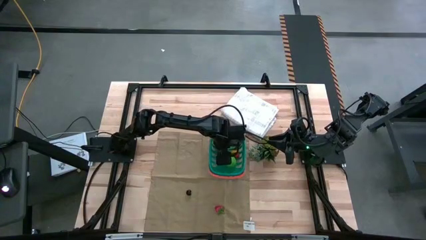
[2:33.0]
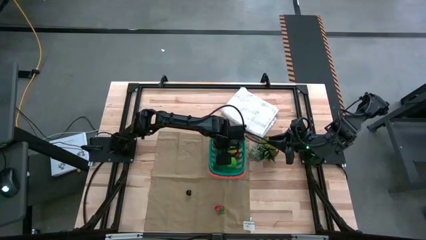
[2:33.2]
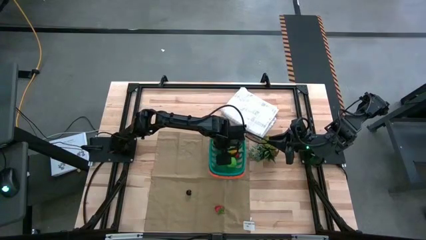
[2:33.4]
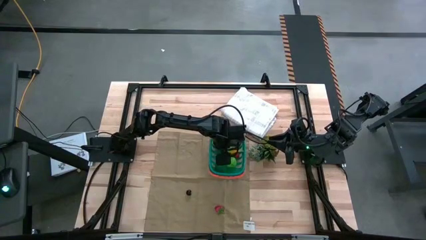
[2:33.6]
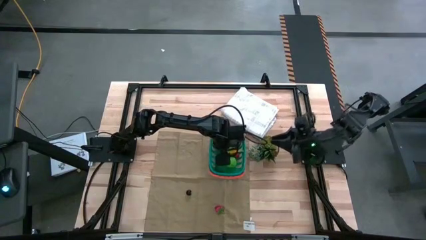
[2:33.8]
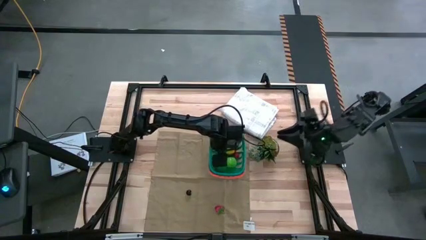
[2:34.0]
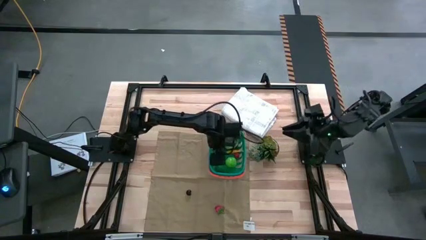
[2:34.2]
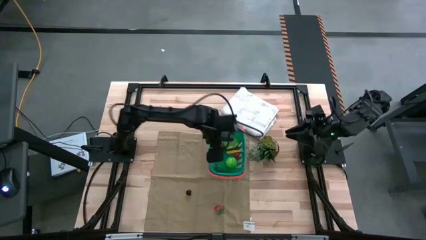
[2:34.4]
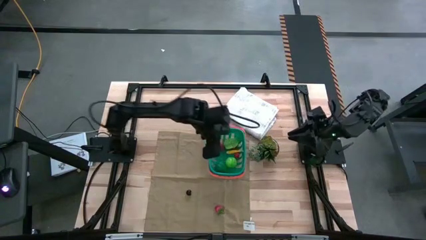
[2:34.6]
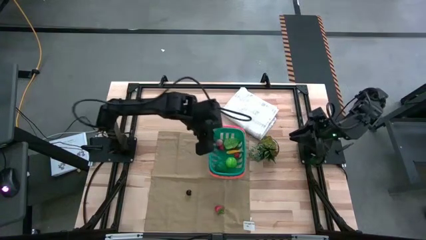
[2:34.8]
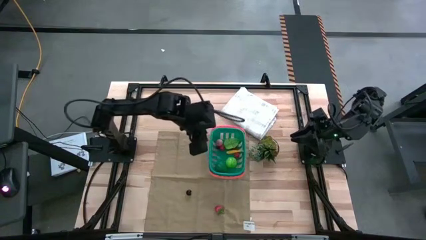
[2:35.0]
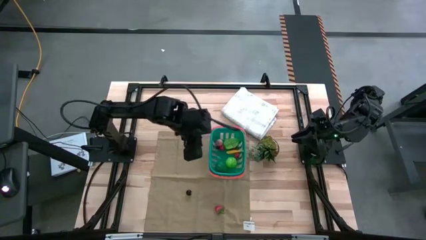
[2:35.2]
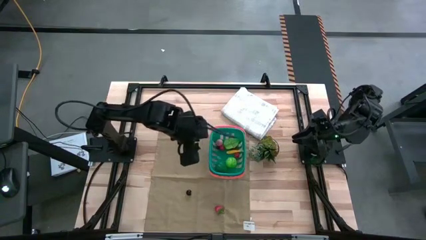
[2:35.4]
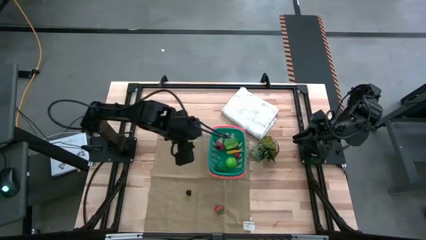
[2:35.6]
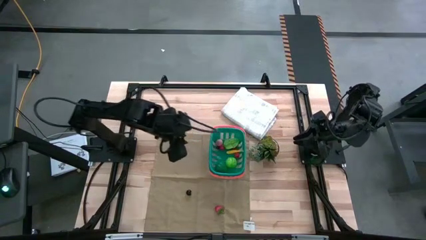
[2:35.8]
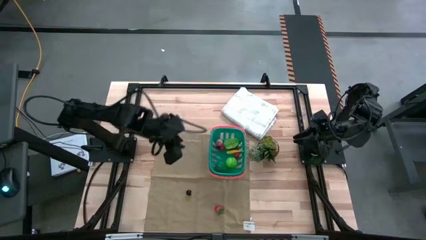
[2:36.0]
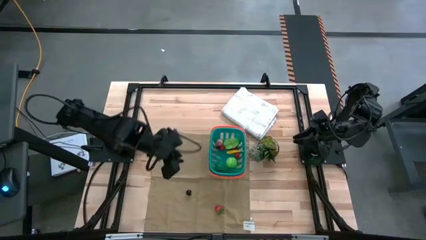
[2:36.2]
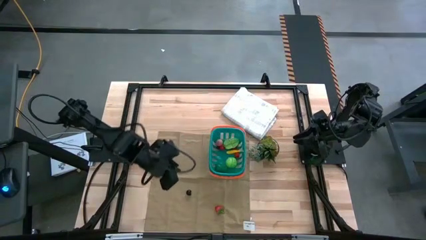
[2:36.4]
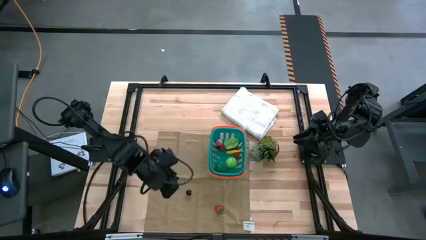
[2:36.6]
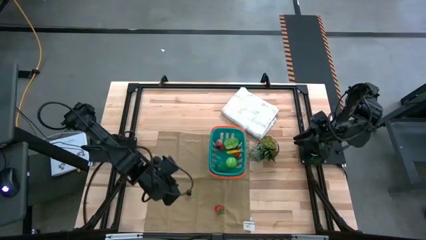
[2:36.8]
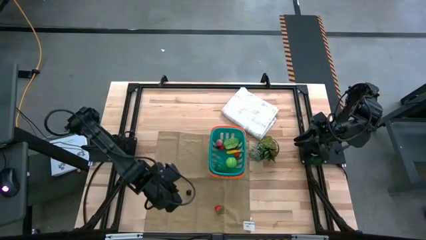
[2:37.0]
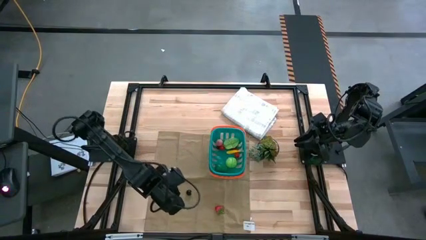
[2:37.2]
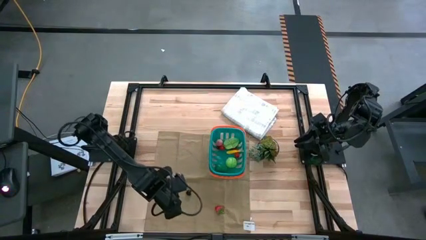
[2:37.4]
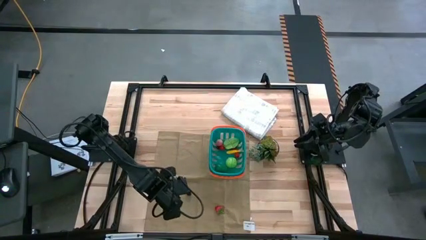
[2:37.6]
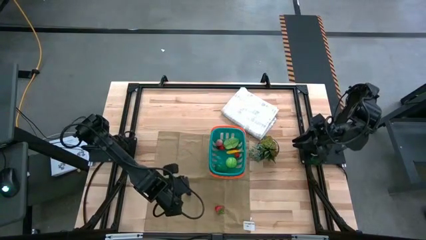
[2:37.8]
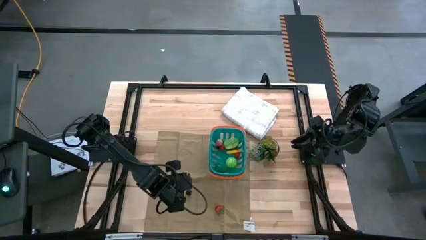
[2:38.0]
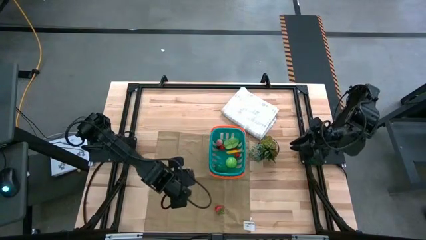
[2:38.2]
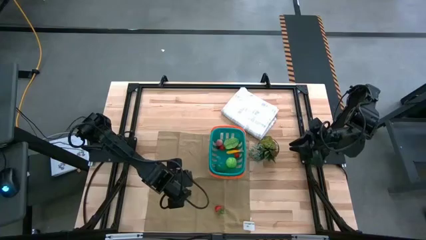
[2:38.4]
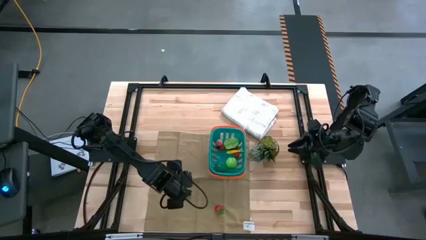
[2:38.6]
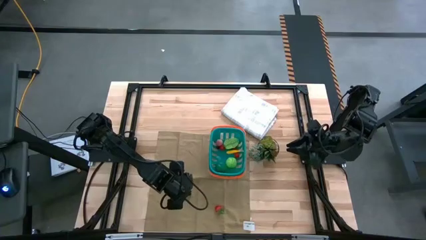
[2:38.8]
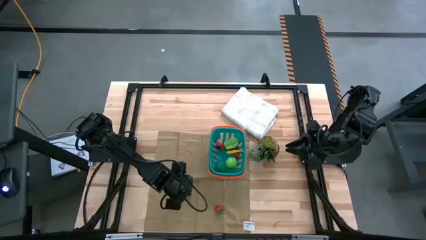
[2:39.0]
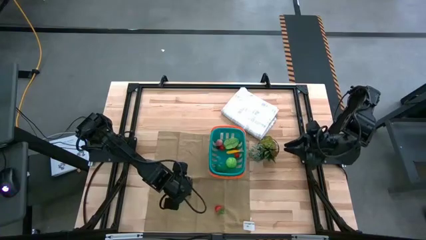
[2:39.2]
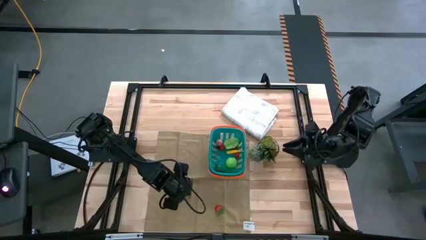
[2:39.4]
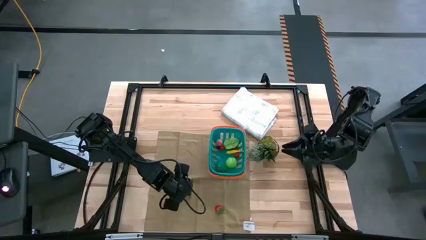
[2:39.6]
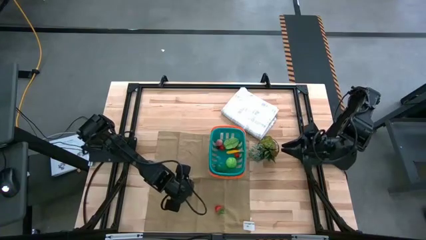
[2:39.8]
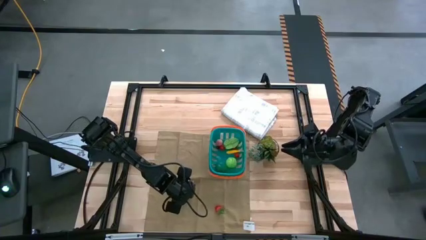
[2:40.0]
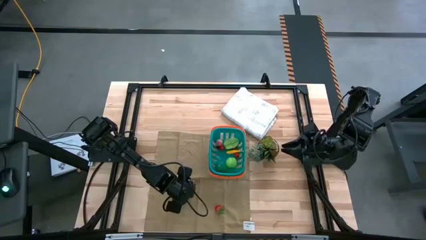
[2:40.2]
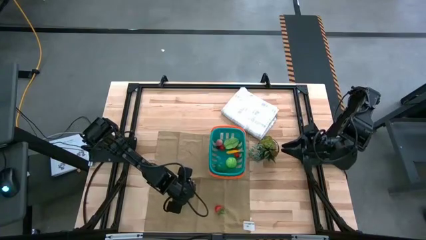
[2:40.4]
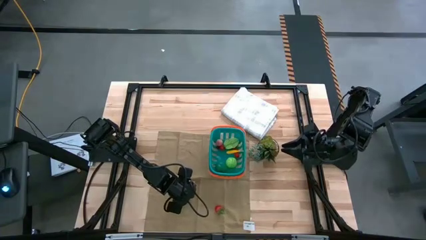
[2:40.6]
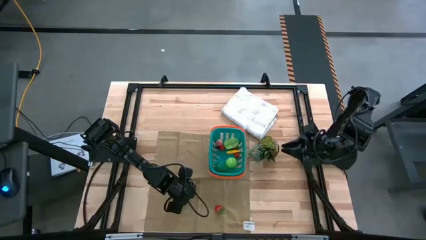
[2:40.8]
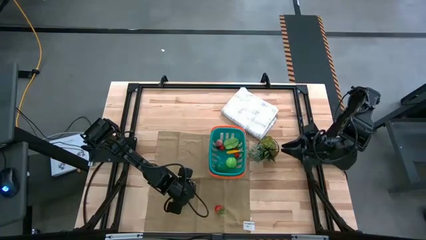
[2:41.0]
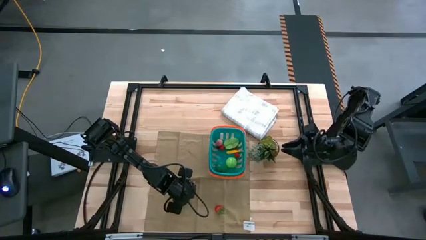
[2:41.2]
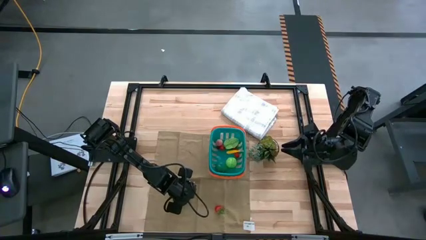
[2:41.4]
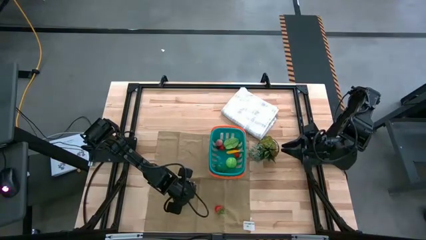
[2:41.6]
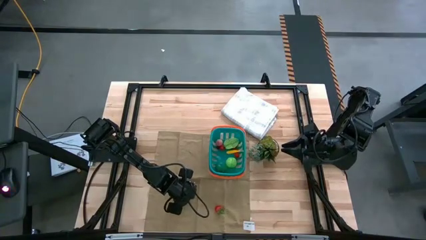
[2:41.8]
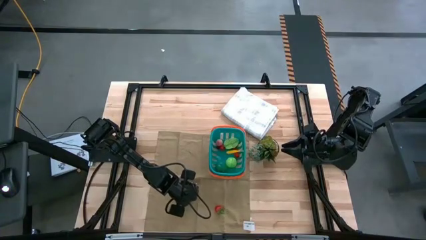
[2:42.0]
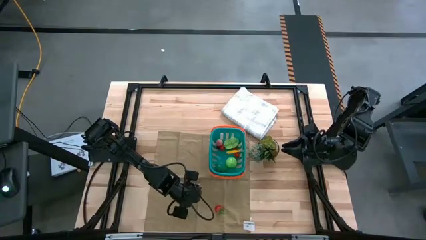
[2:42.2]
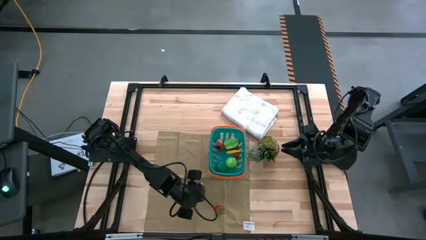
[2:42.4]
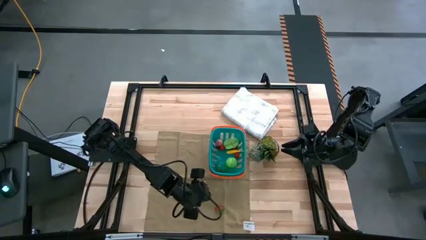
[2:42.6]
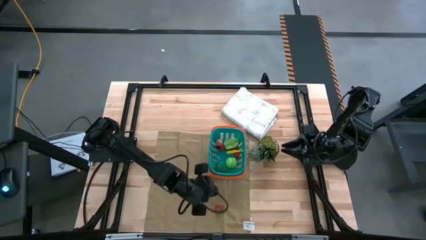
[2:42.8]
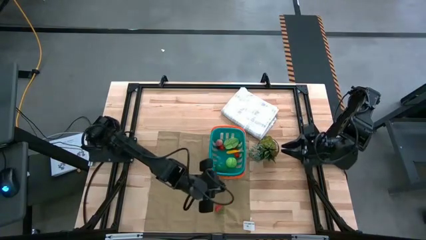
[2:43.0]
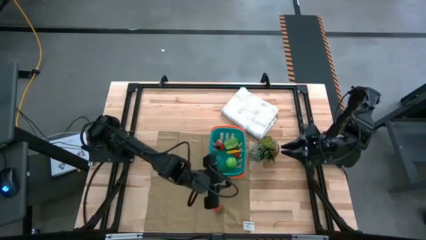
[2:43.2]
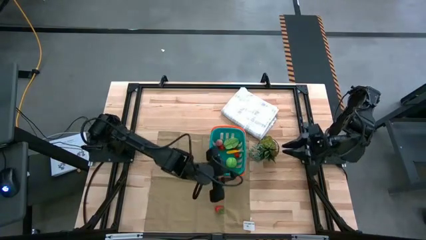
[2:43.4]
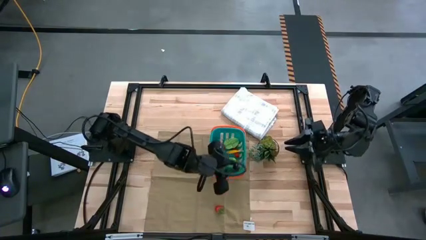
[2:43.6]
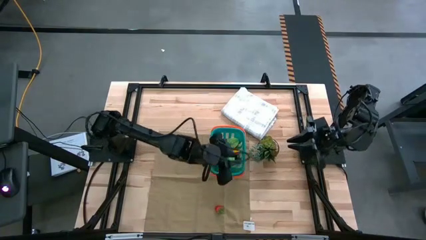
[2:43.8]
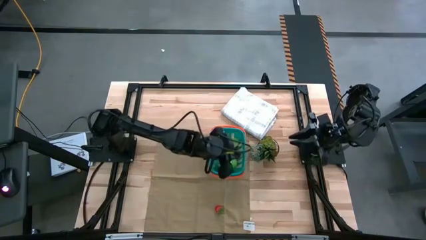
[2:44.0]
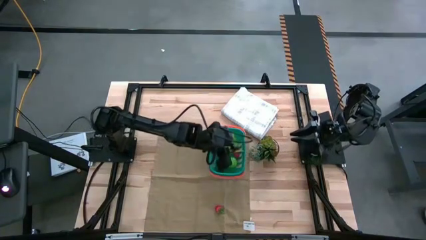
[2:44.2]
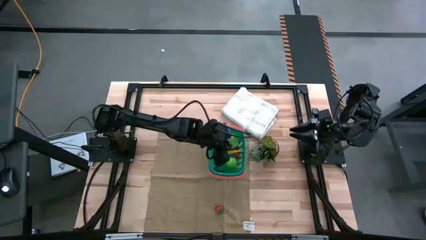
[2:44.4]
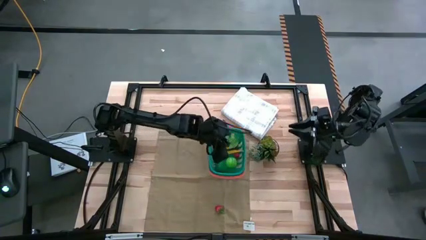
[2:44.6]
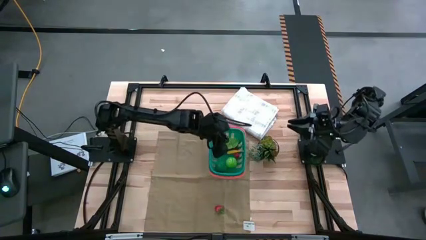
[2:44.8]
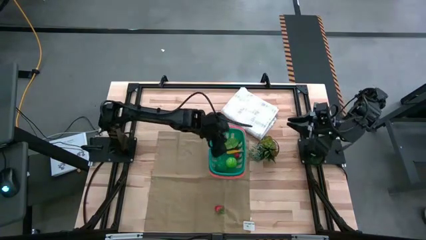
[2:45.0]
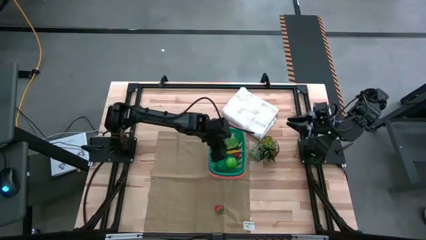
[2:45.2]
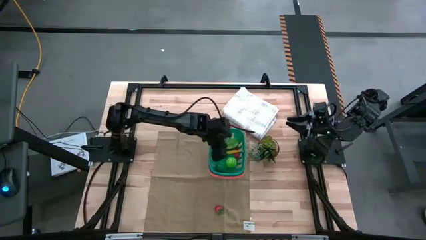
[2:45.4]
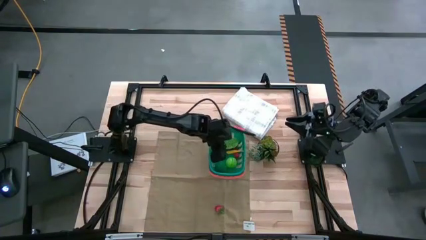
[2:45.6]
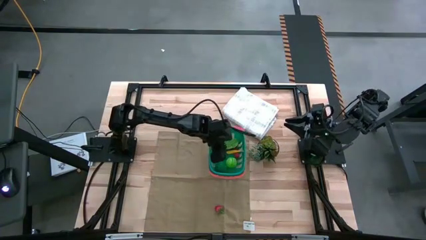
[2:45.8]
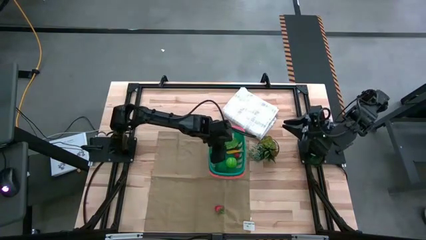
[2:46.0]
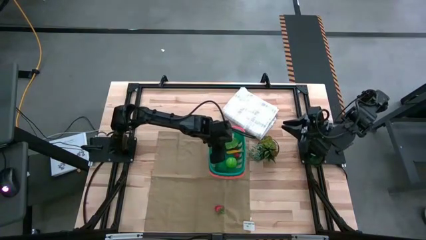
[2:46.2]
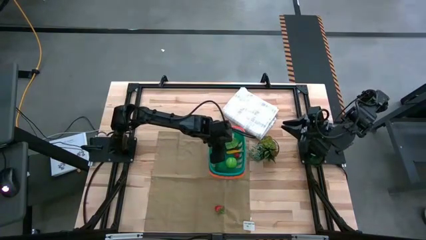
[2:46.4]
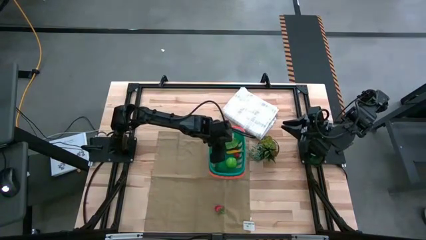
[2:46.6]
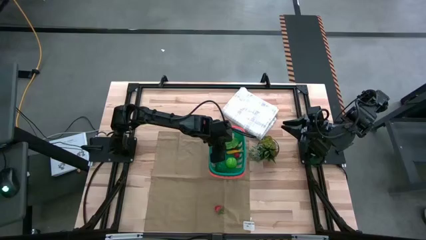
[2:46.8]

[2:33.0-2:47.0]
Task: Pick and placing Produce into tupperware
Put the black cherry into the basket
